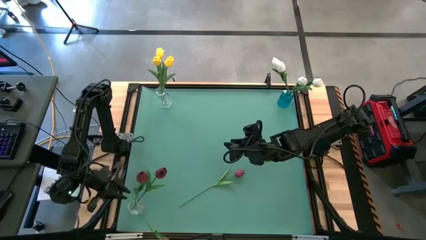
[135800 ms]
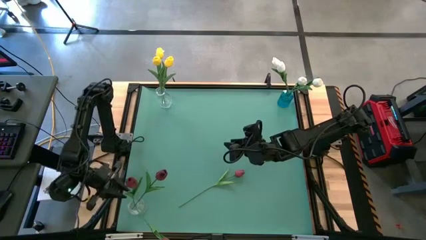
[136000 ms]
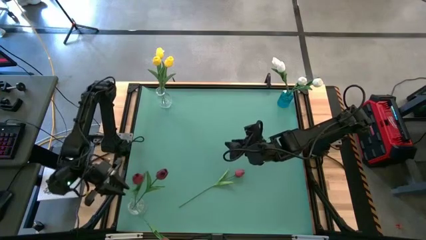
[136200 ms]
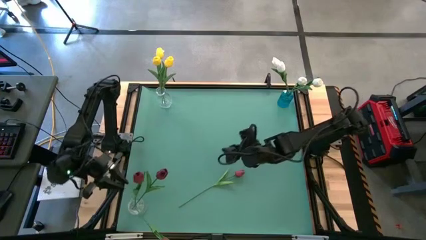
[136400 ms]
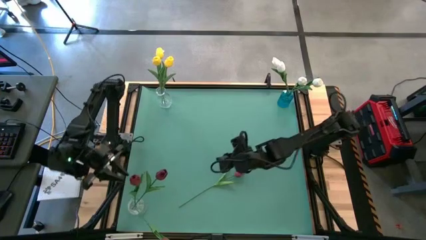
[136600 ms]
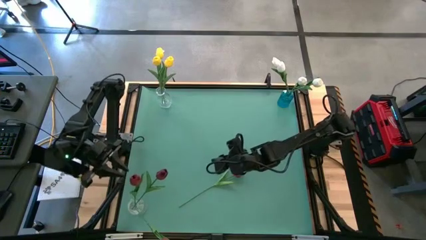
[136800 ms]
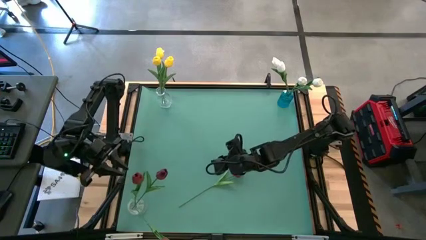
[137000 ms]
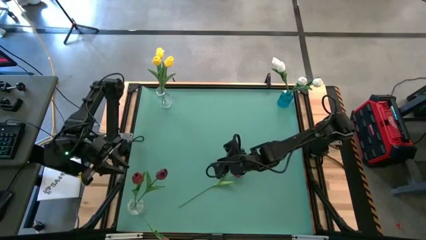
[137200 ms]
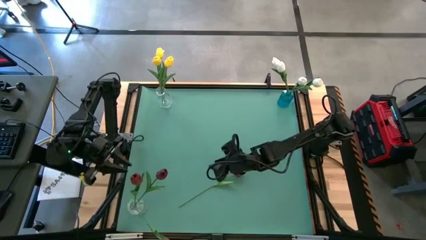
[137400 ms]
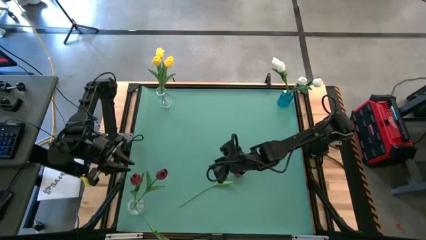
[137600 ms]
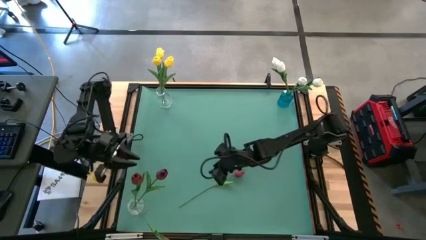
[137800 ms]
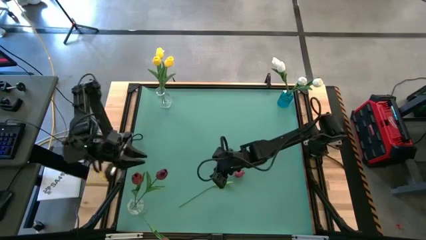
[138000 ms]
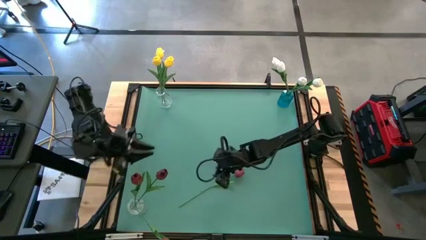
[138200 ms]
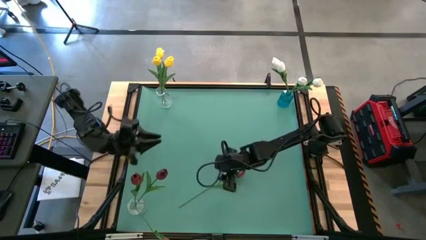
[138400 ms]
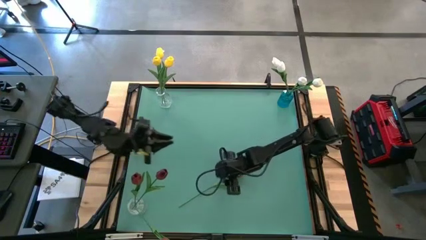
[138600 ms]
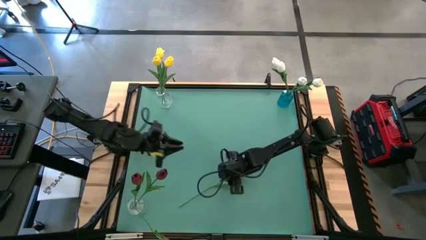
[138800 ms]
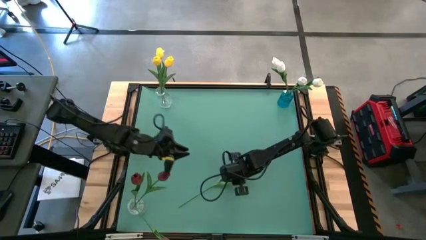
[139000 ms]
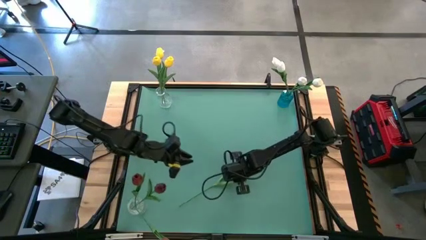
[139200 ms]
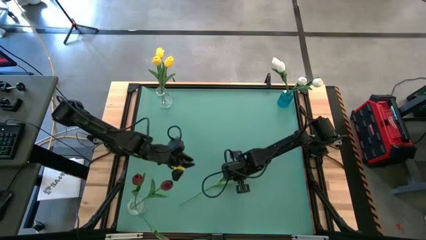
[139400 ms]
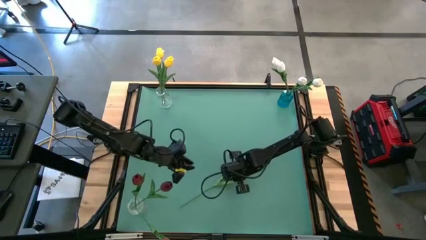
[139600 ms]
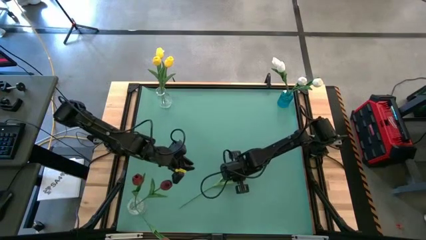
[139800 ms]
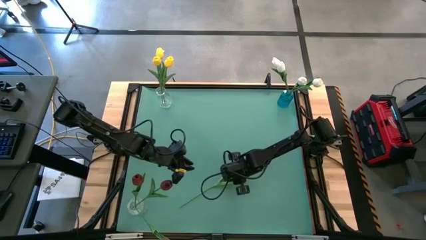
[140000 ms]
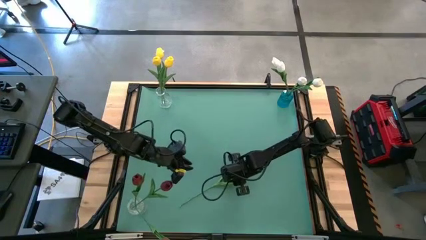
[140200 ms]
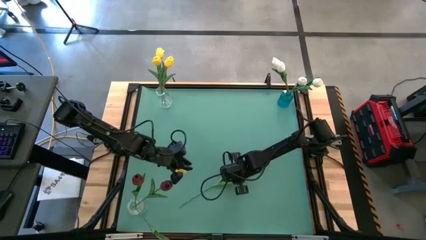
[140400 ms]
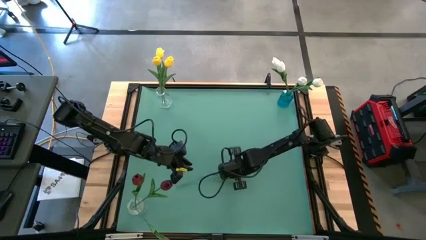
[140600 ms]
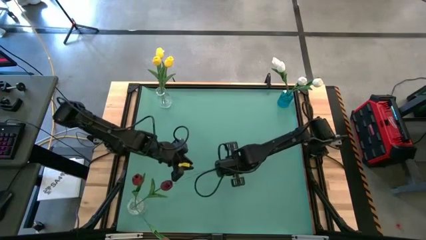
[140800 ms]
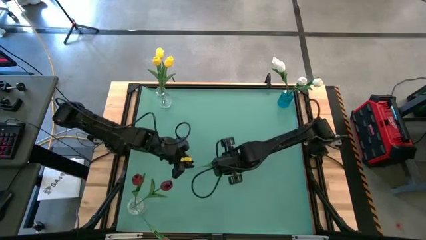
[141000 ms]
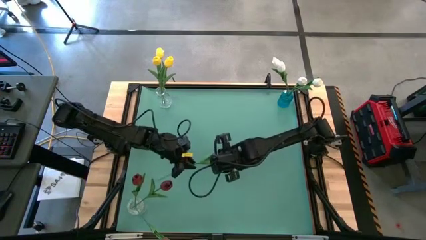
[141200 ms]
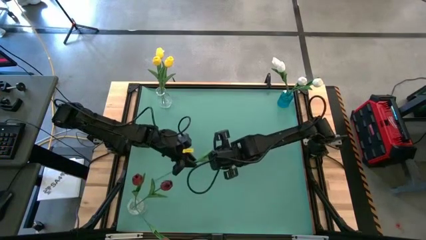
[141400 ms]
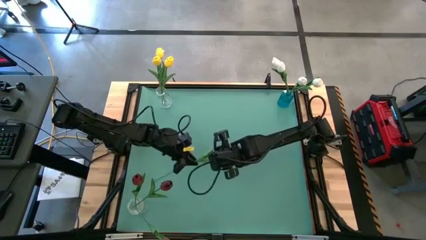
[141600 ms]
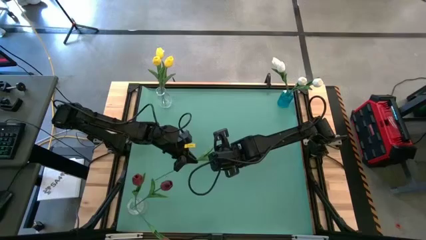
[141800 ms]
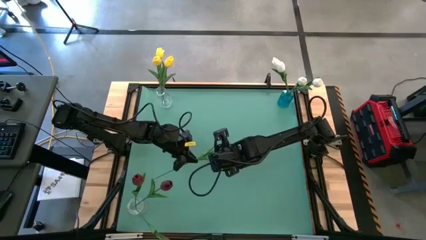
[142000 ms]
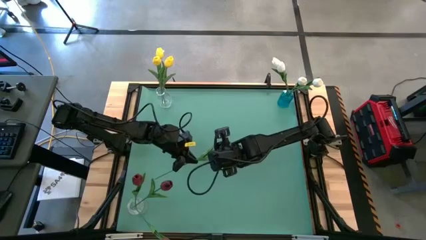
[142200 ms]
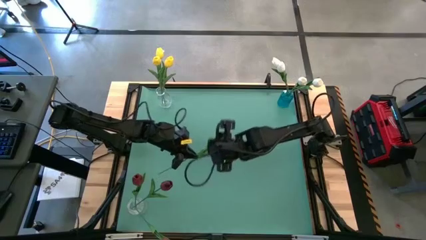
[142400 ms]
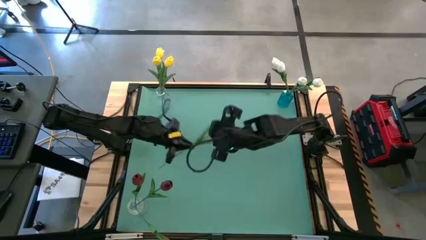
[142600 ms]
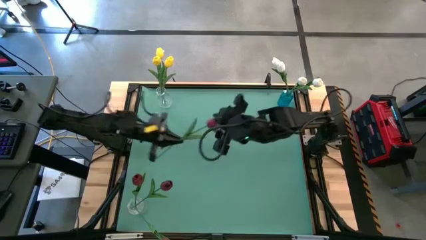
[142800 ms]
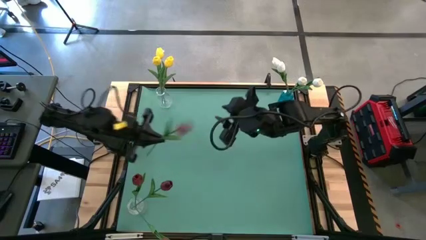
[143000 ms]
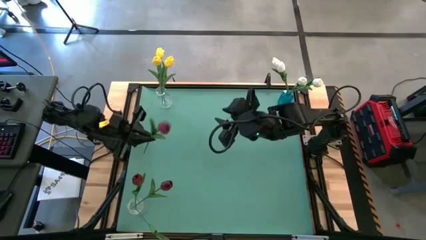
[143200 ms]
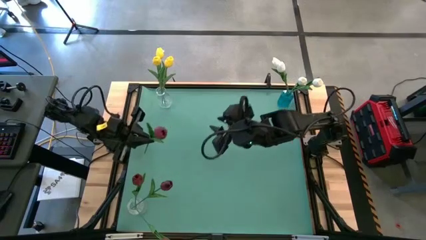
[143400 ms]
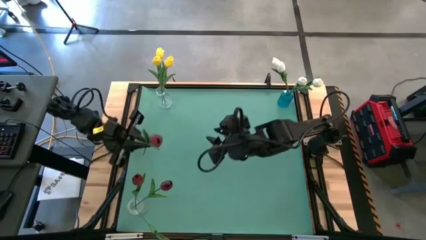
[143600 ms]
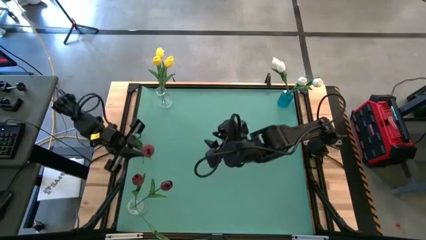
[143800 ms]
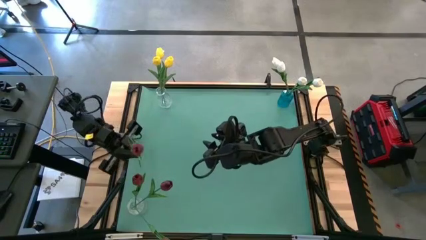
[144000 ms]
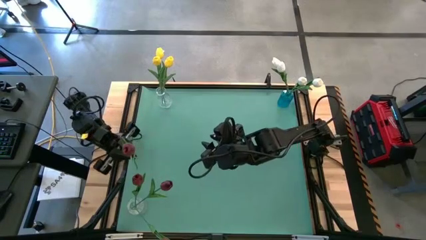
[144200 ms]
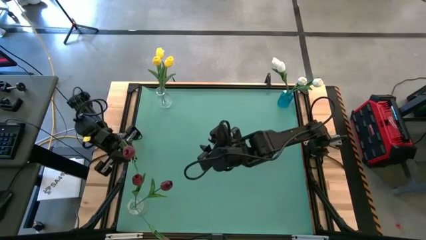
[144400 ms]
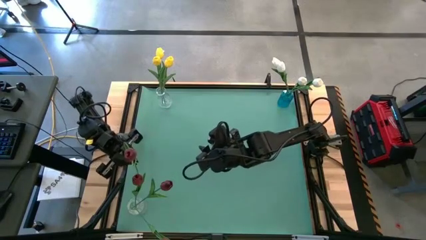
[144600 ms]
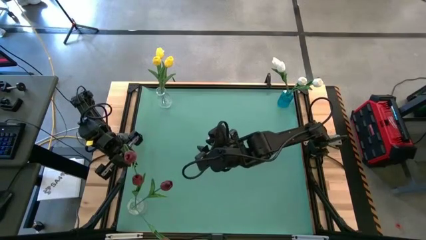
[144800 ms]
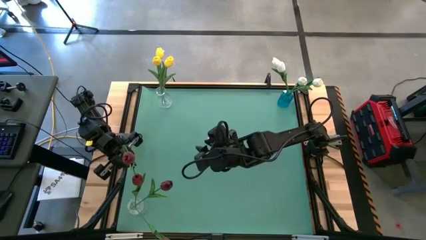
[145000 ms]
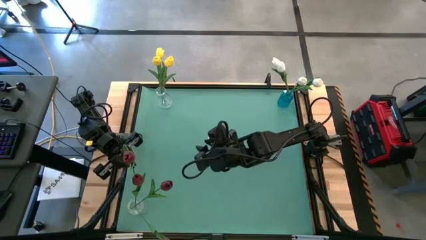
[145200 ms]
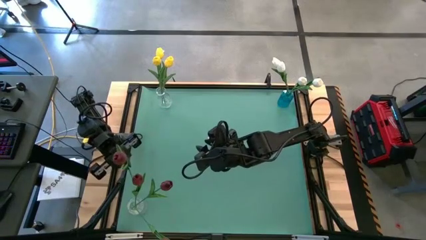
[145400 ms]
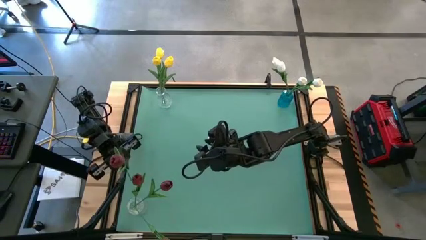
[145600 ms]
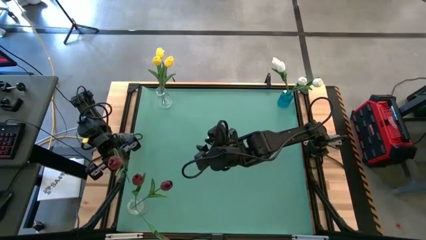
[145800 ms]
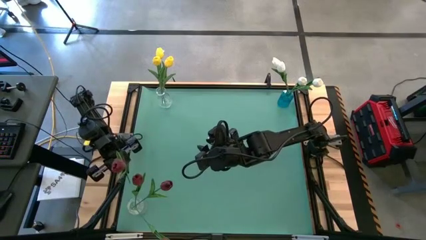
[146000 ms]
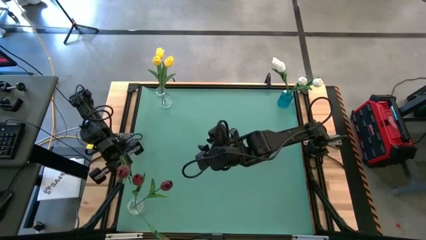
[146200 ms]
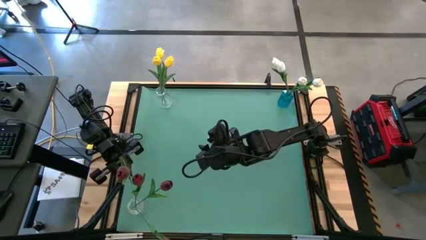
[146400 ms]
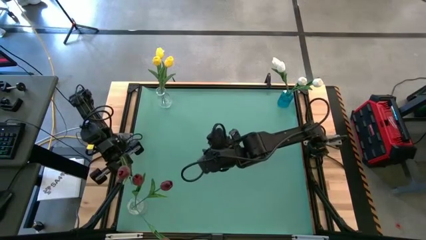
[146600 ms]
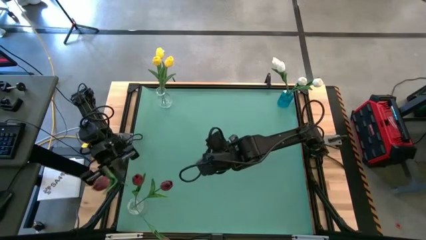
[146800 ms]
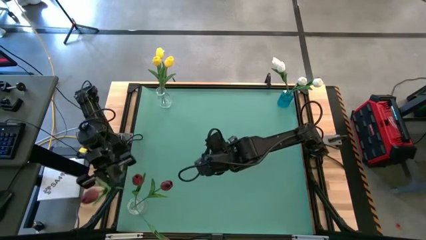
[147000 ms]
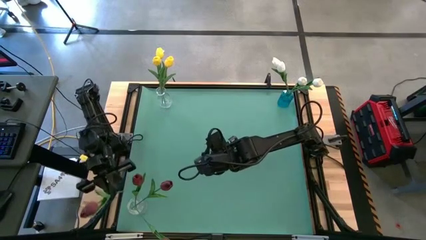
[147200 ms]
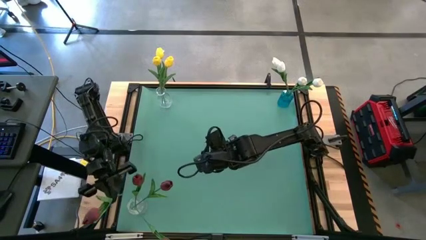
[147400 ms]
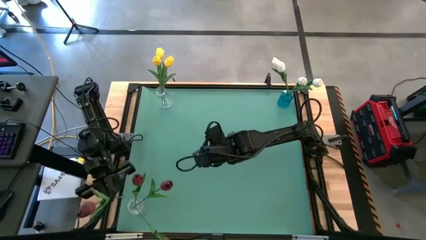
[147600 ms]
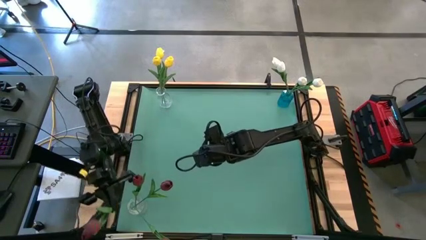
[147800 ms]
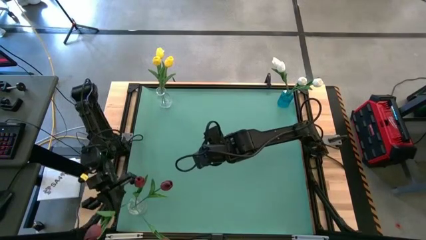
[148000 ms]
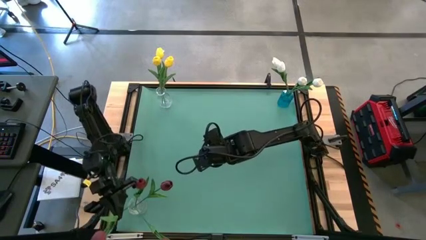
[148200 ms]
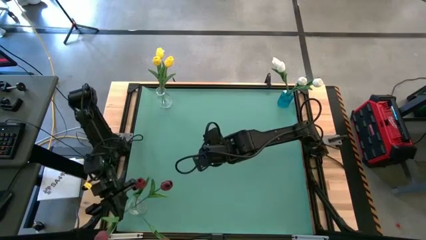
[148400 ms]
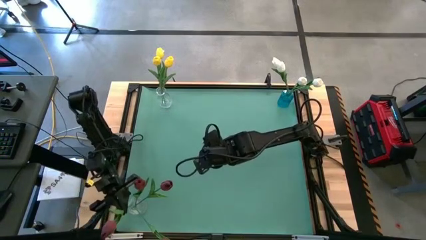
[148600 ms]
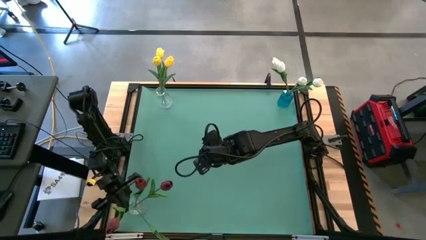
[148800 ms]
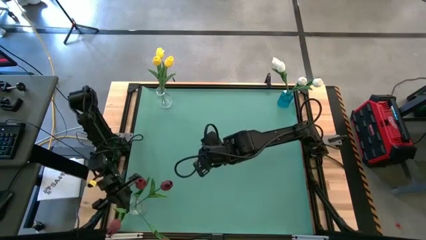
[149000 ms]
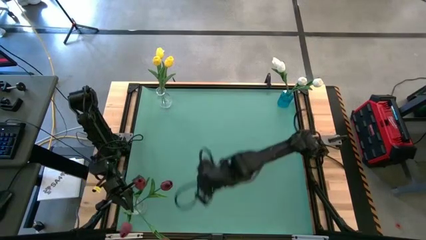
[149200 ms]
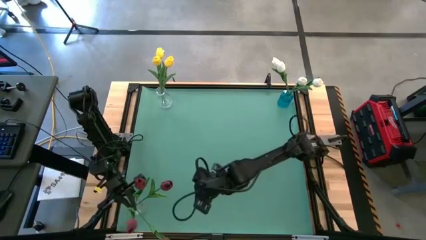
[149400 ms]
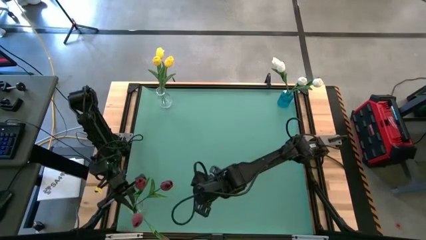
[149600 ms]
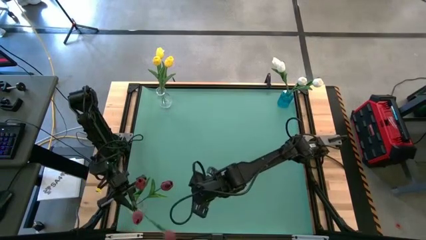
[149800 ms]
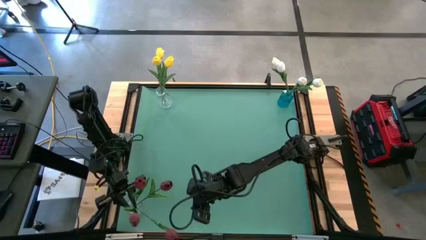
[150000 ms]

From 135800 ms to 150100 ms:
Task: Sort flowers into vase by color
Put the red flower into the bottom transparent vase

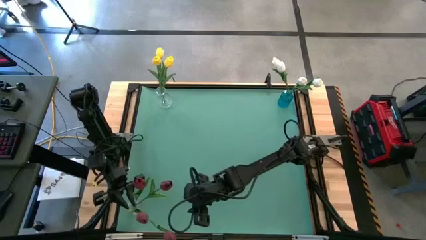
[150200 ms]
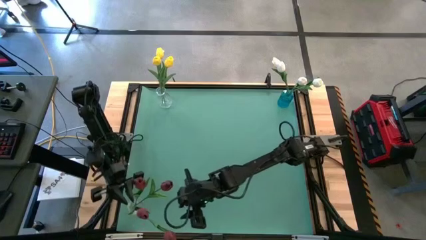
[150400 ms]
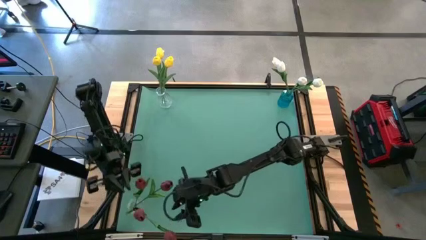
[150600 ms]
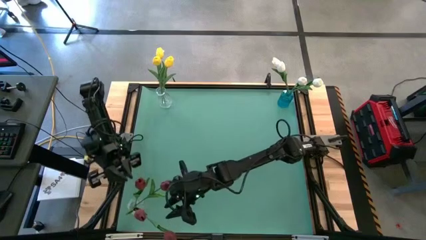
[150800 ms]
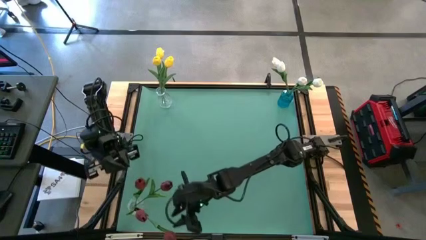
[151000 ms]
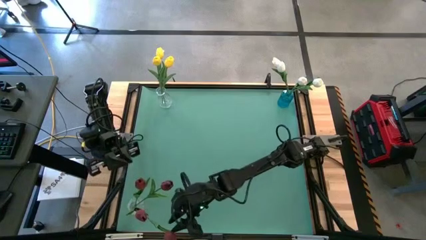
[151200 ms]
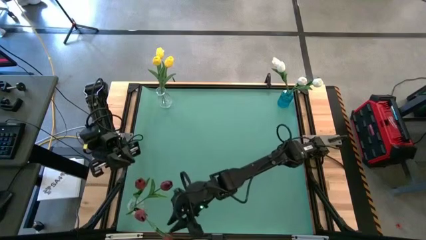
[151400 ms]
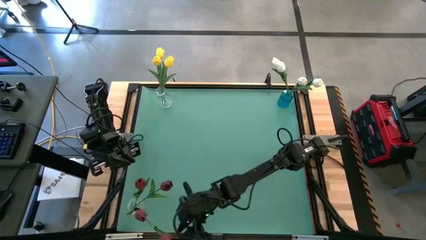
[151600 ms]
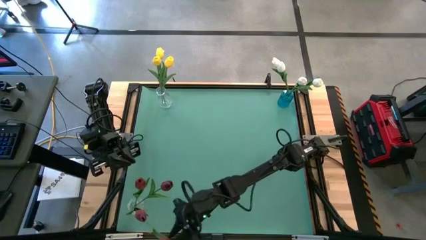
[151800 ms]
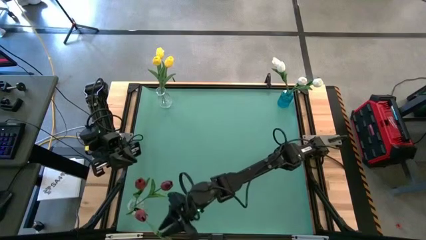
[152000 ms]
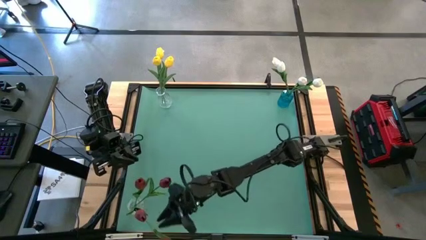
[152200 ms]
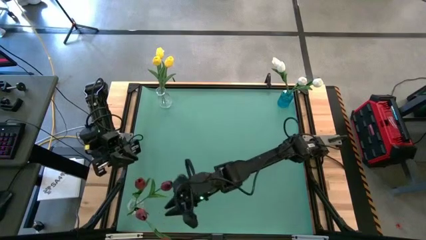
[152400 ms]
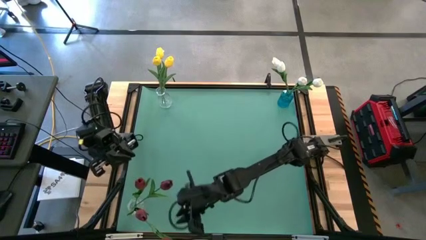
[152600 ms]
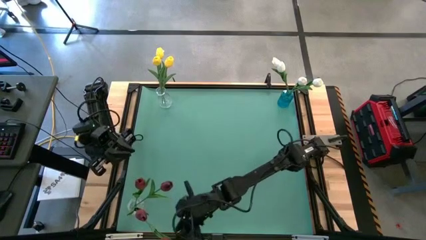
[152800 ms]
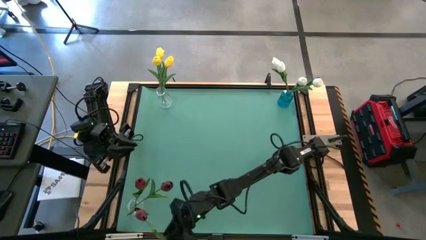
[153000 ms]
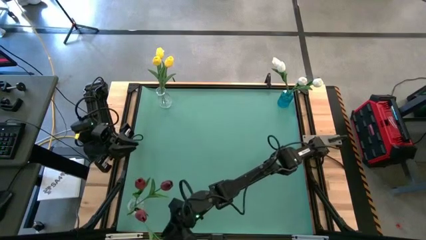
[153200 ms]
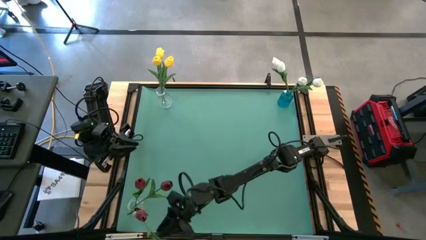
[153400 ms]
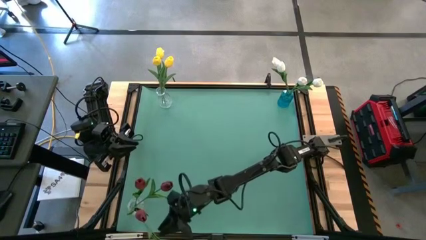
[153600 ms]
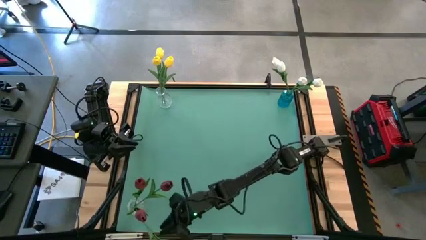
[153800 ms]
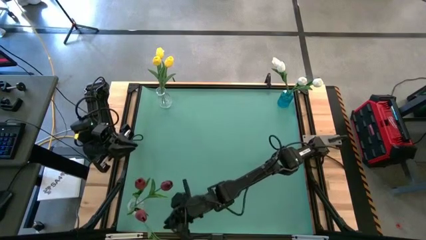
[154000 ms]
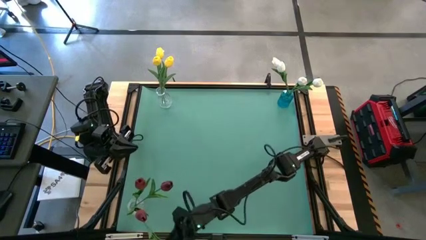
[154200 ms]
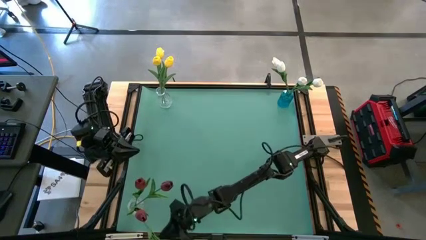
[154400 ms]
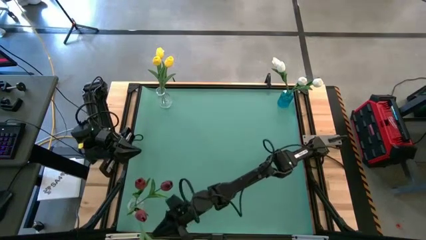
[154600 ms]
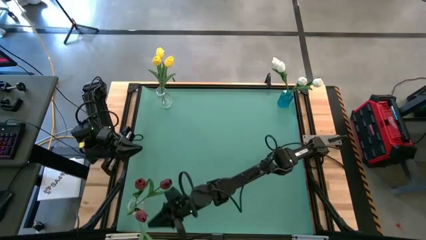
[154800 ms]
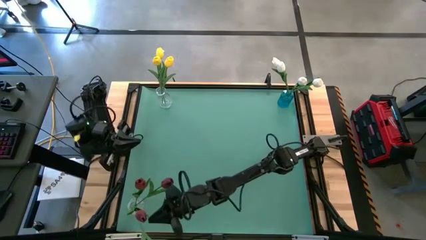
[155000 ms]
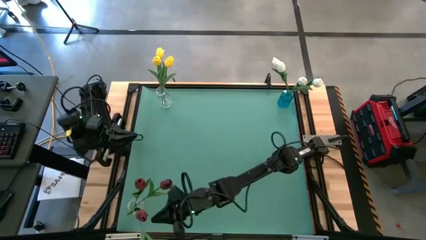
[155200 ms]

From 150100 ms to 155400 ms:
Adjust the red flower in the bottom transparent vase
